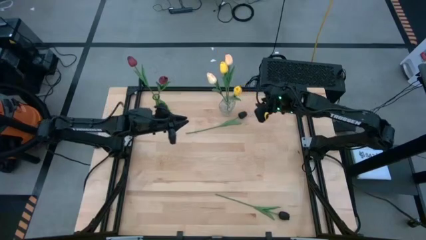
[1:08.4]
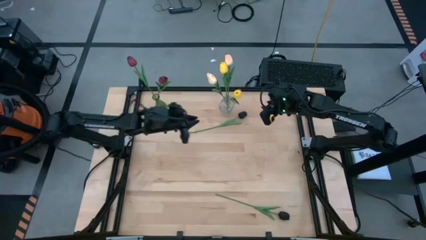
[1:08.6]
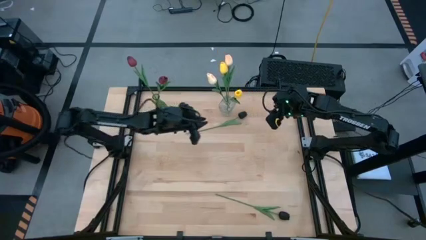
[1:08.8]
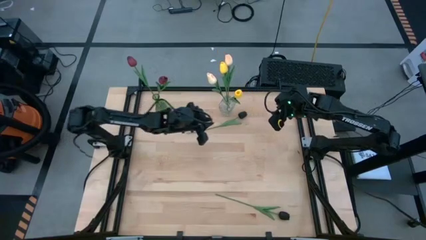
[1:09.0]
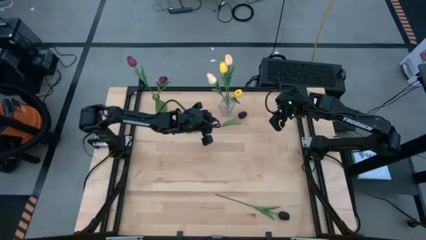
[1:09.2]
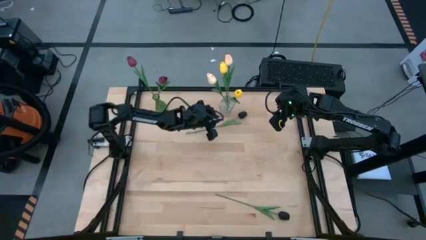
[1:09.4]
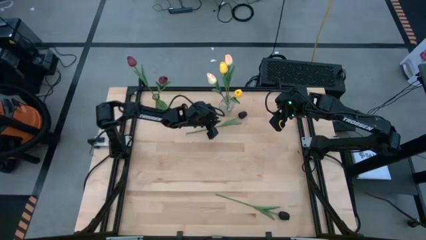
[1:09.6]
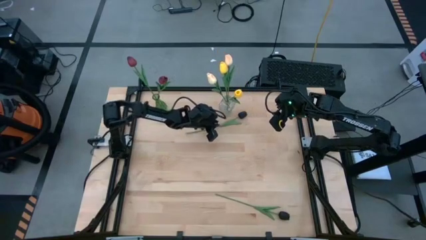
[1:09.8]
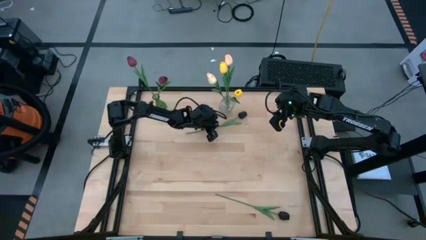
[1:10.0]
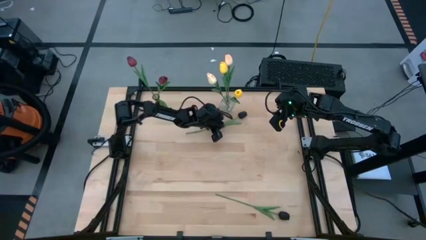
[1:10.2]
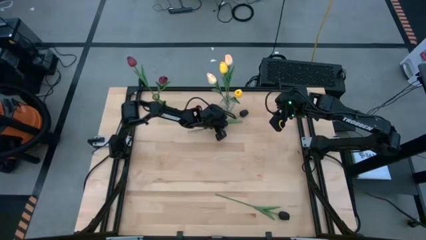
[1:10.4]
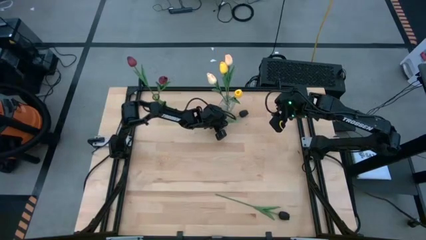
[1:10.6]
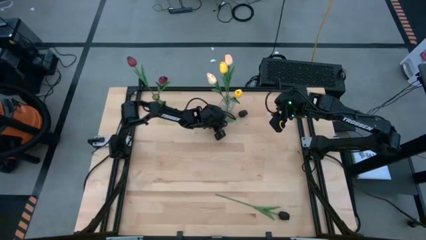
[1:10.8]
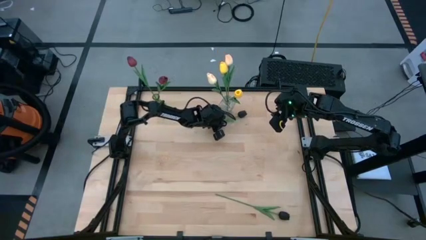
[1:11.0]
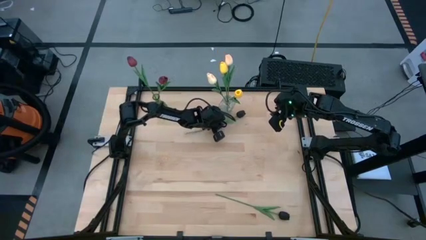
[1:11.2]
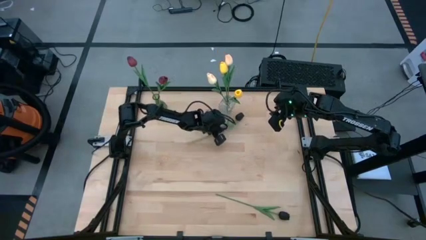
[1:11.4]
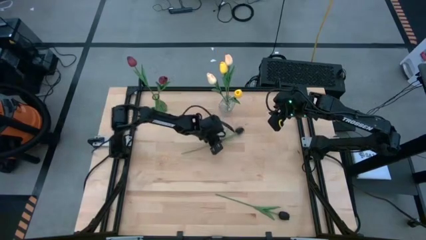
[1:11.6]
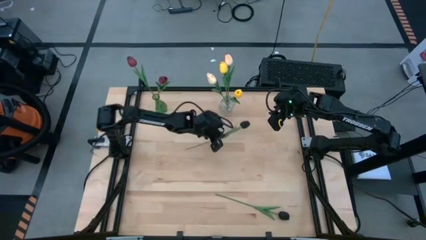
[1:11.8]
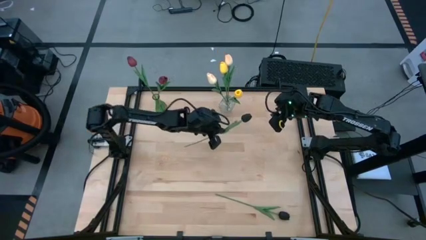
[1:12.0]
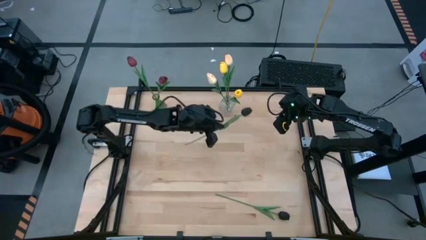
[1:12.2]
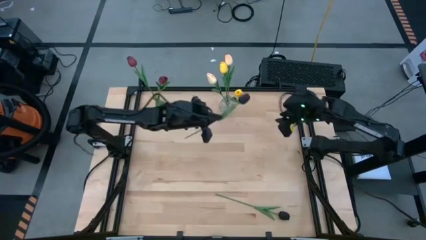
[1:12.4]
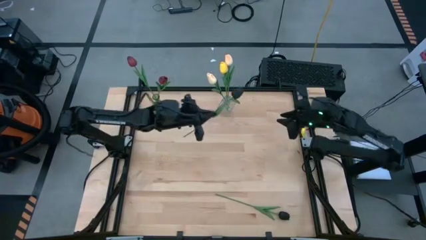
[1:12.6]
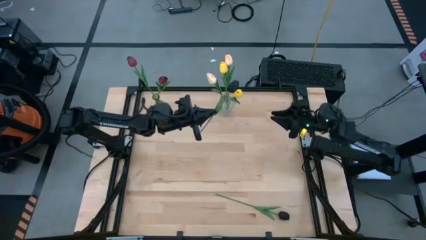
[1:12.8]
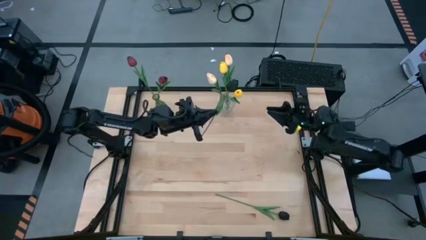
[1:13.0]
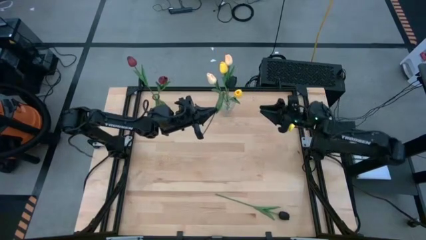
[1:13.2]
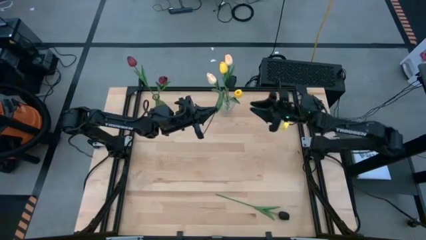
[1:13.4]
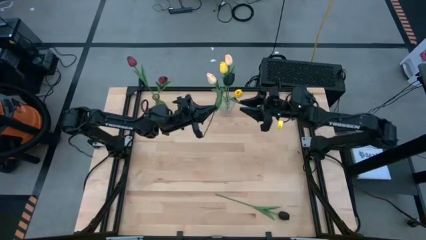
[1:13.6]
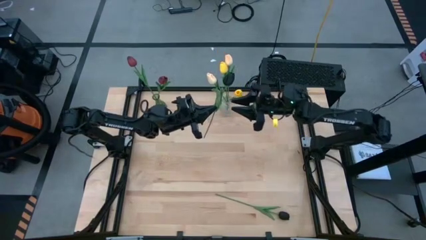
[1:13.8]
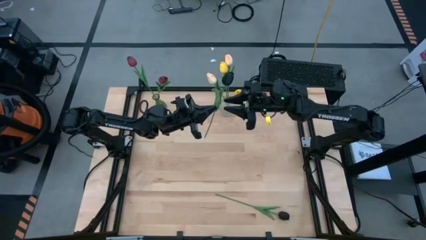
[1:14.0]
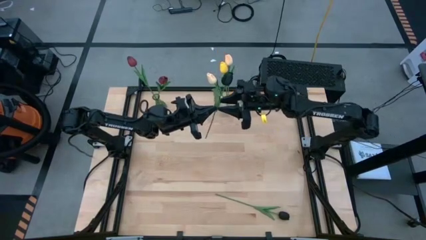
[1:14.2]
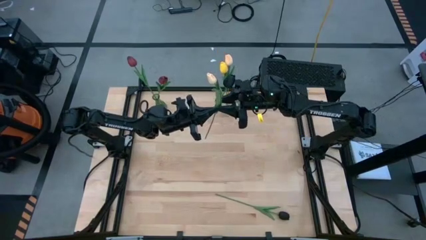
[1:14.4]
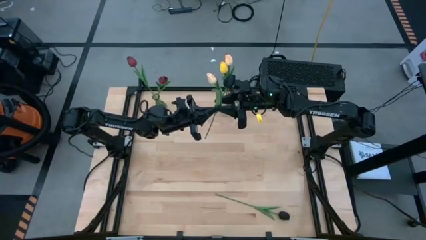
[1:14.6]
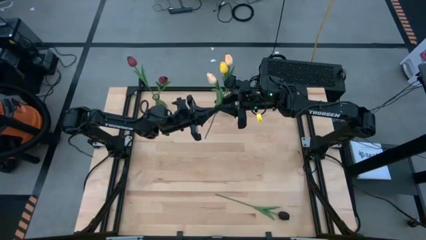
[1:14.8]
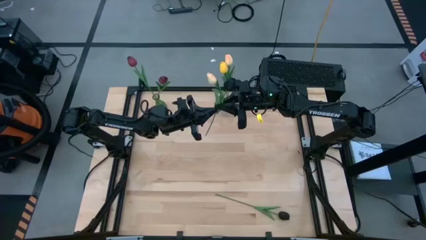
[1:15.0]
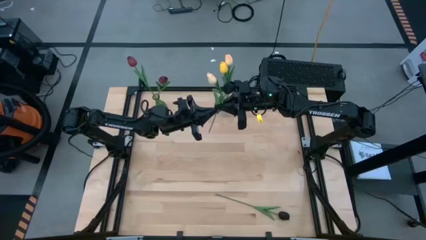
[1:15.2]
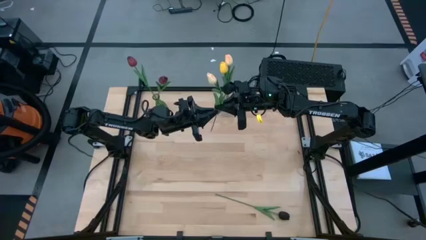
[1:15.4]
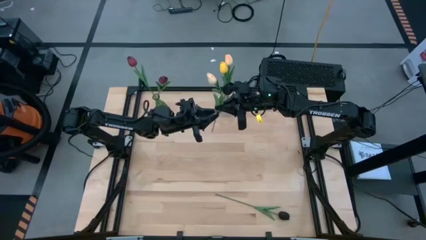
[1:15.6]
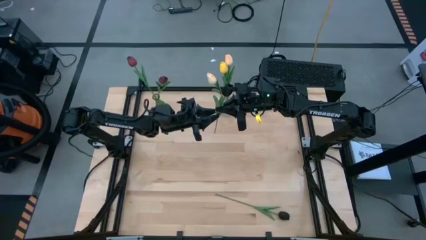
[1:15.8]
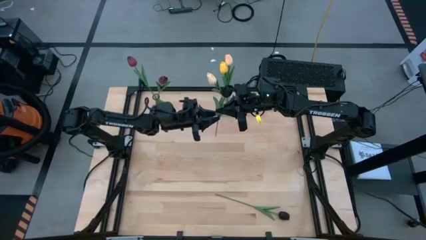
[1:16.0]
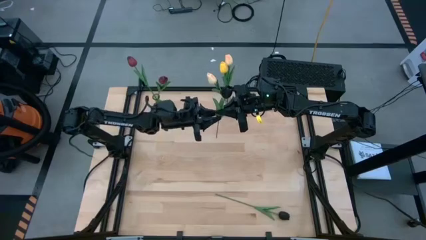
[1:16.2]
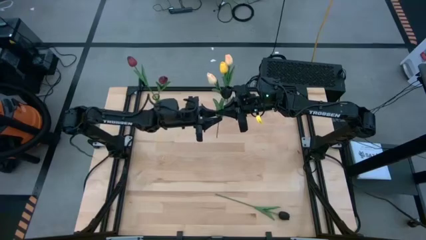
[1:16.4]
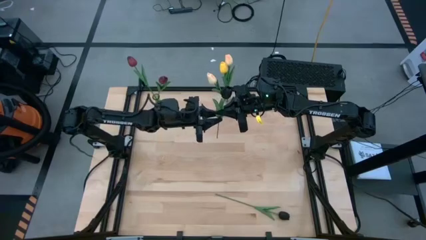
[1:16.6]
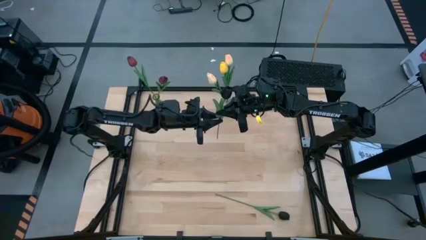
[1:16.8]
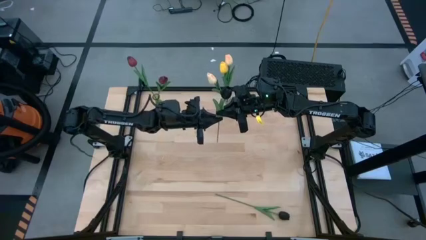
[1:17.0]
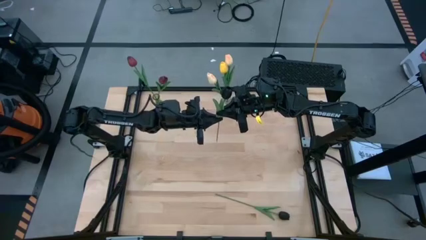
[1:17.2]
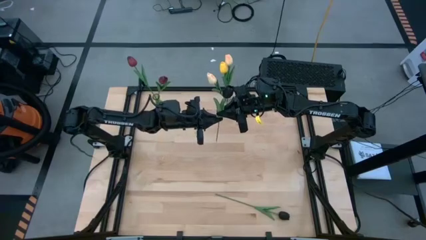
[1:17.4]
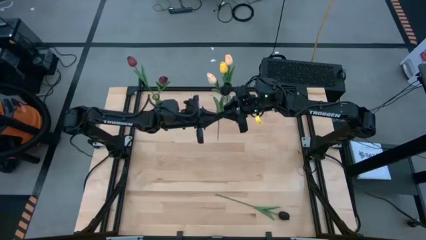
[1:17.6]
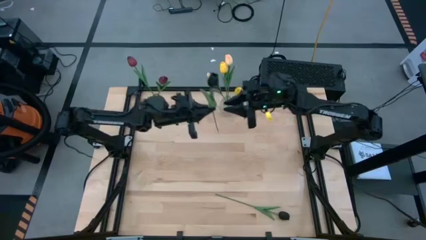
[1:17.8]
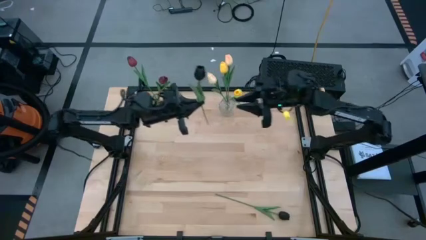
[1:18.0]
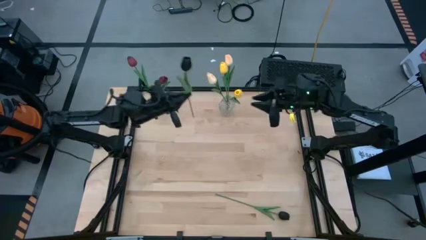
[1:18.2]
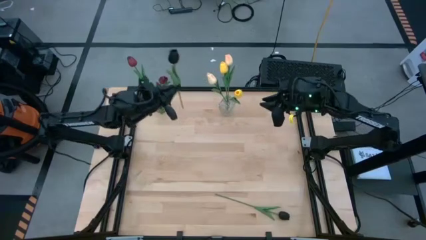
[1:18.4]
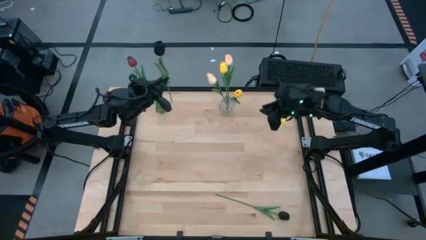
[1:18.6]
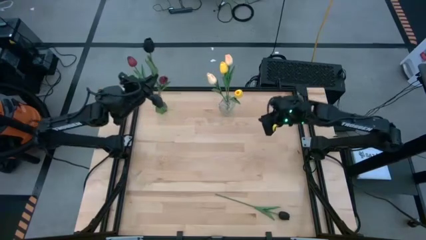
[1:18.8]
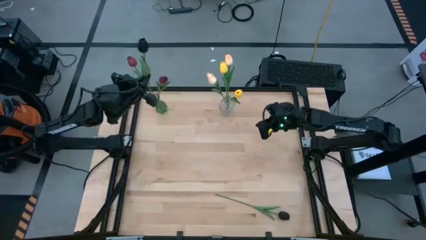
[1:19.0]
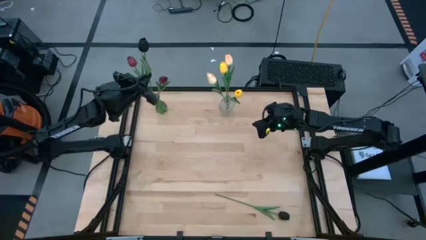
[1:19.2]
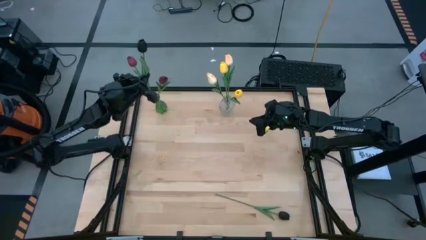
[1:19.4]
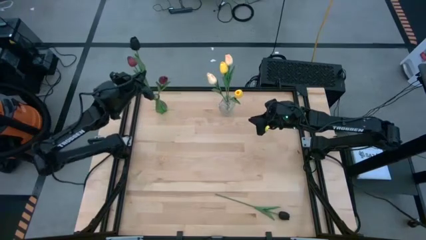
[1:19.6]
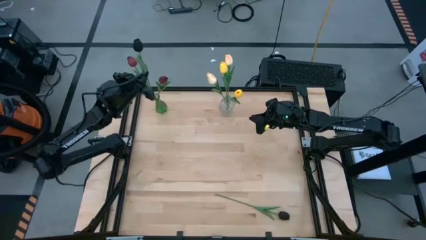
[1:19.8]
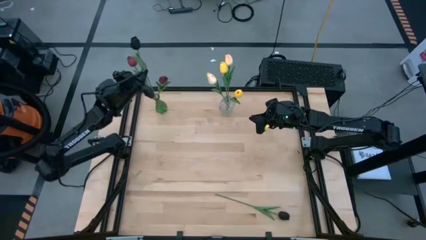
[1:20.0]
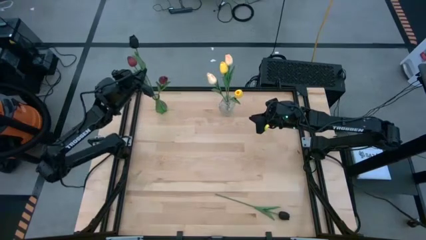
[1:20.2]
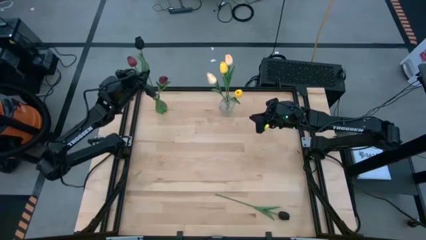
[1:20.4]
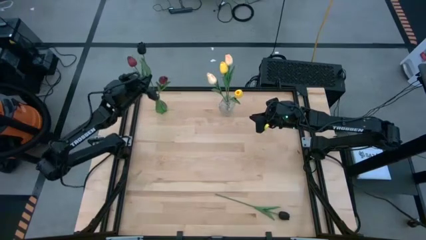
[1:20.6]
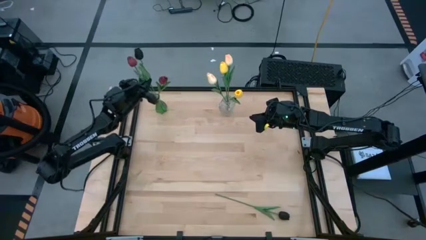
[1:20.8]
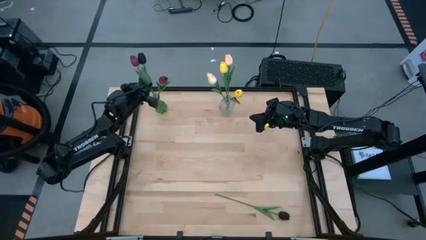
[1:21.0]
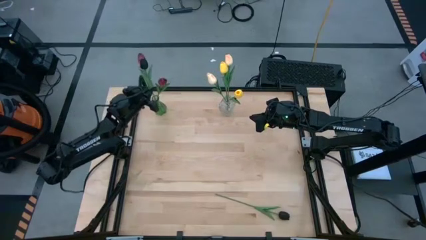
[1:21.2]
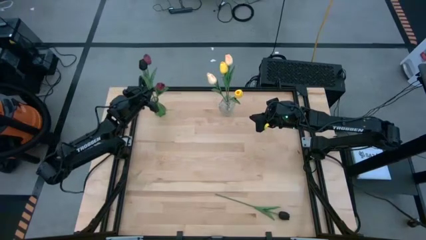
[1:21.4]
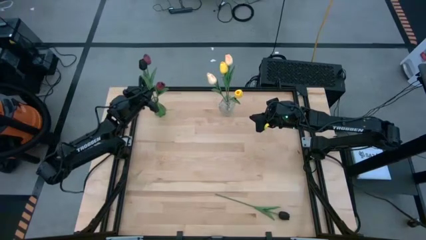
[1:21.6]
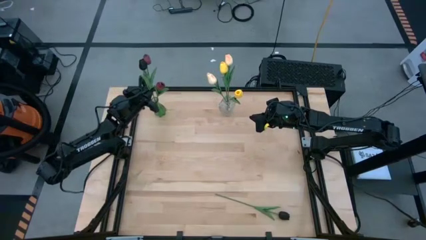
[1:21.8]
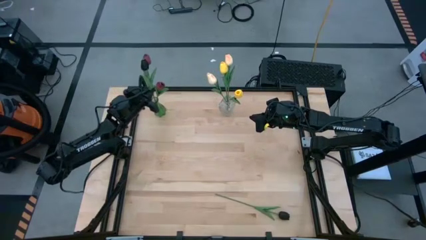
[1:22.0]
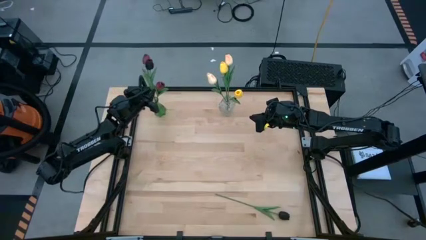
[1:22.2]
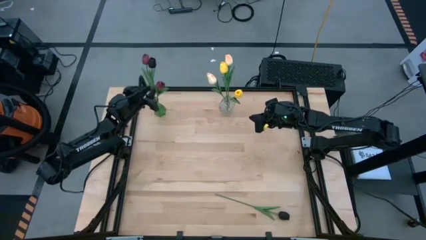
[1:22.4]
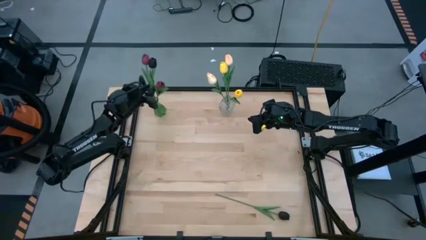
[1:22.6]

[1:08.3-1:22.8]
Task: Sort flowers into vase by color
Put the top black tulip into the green vase
